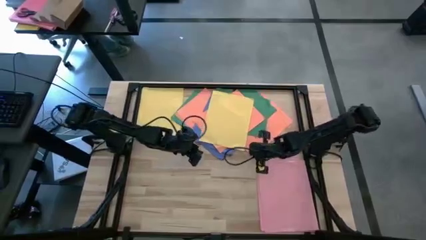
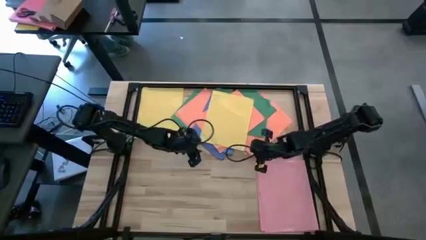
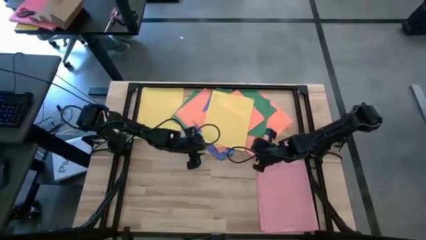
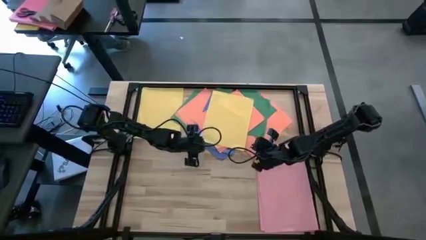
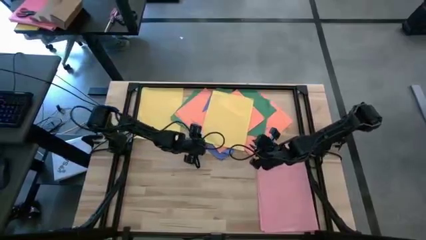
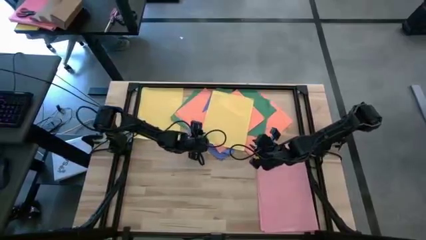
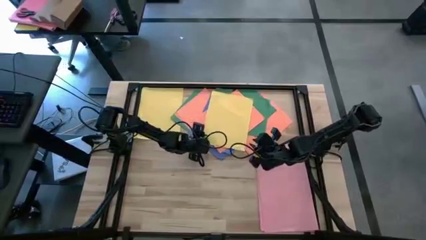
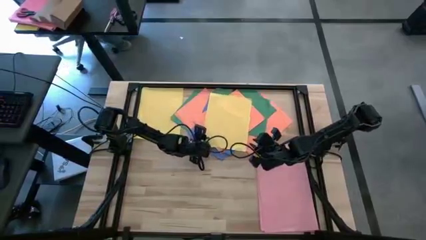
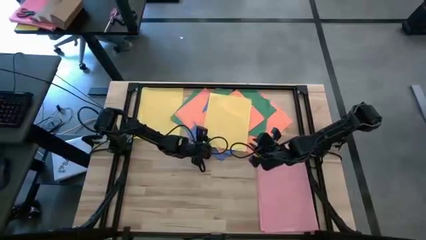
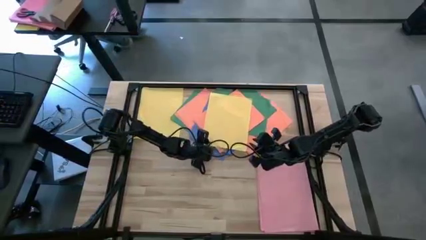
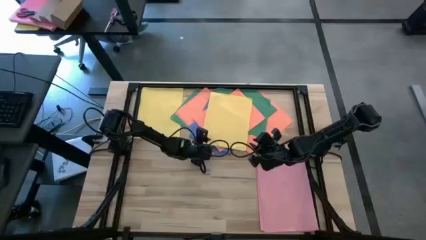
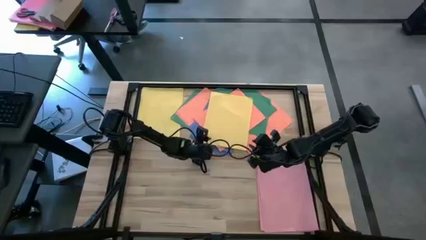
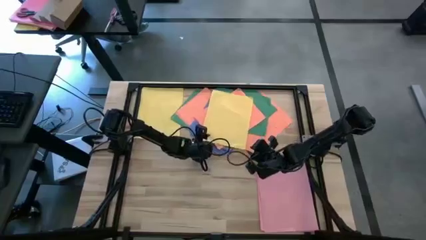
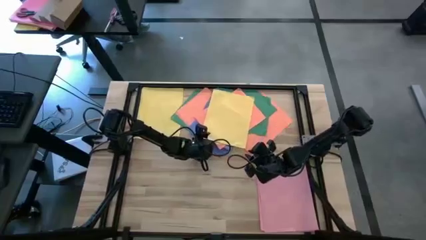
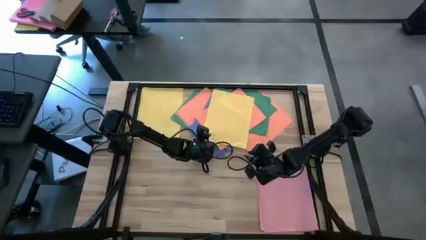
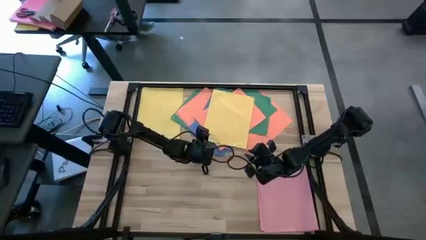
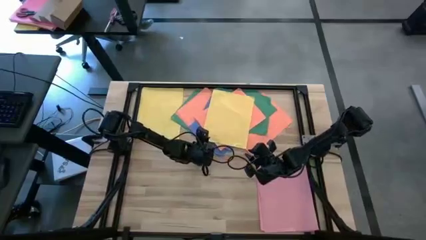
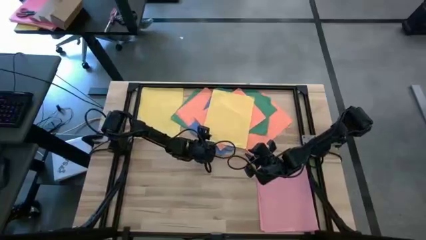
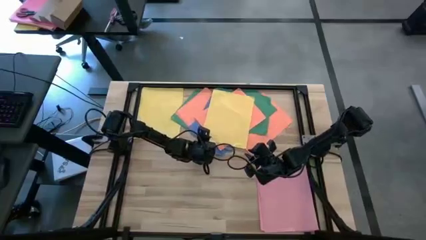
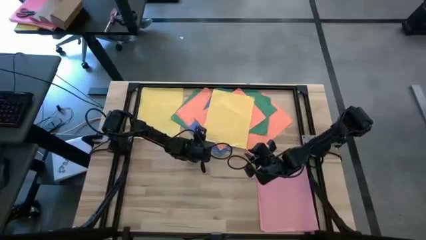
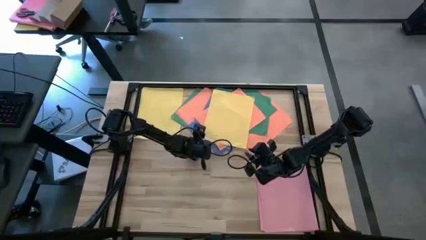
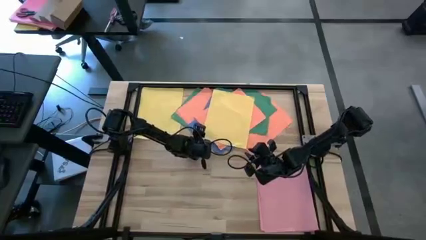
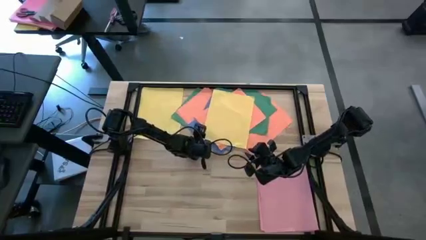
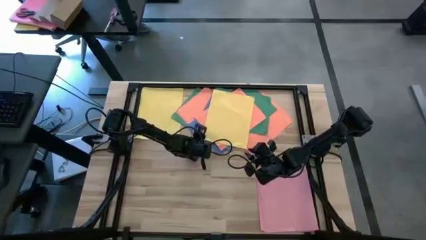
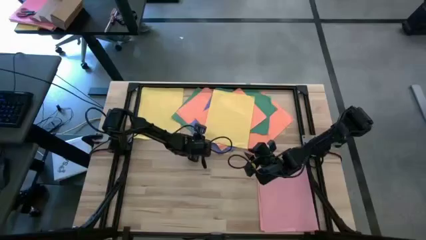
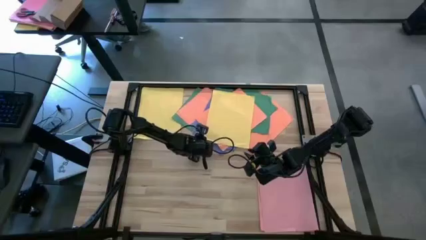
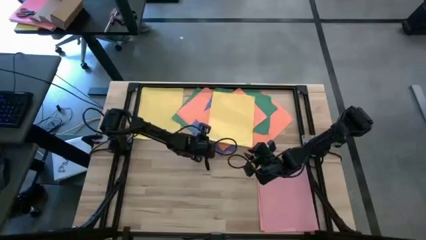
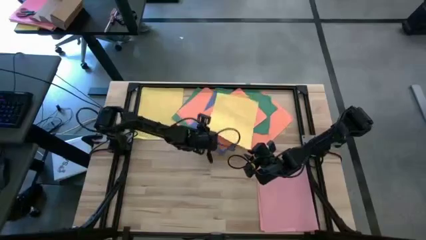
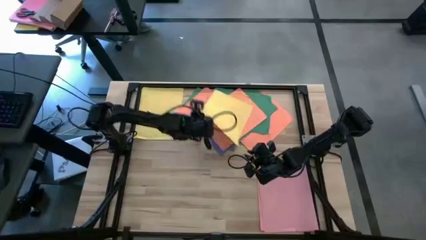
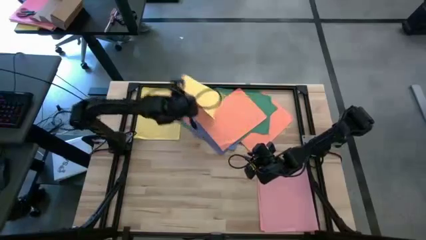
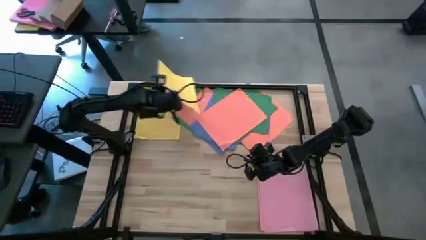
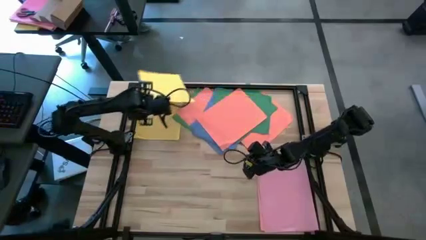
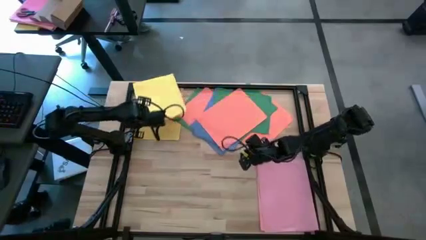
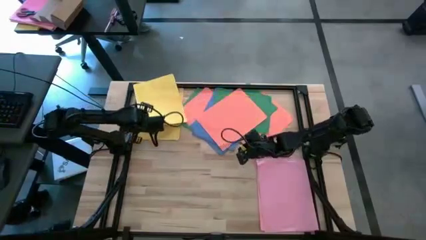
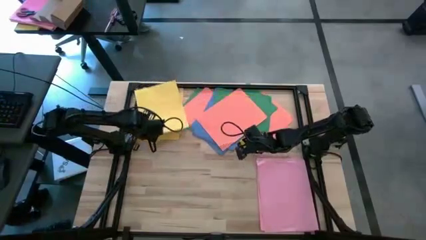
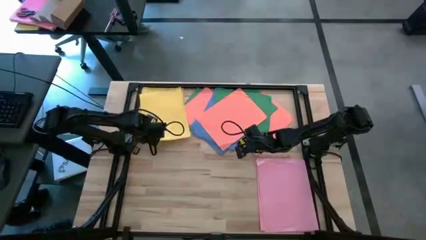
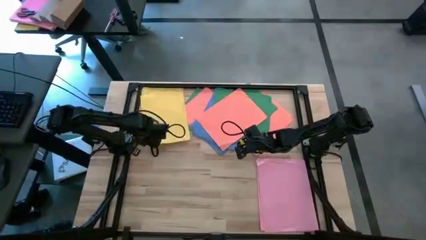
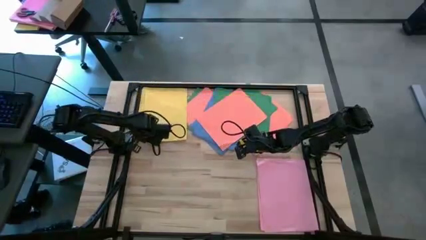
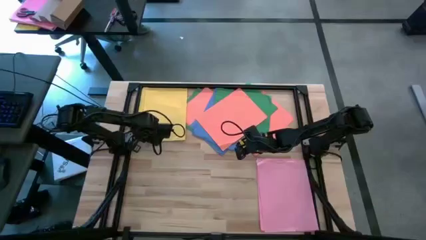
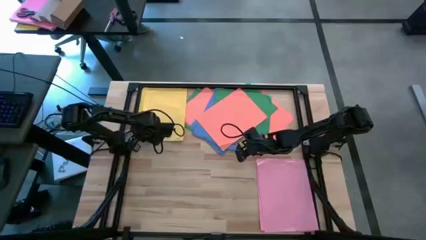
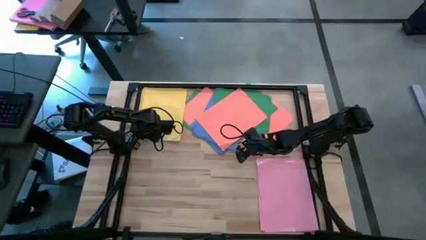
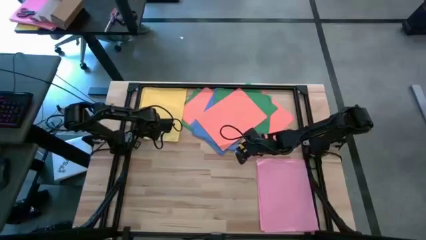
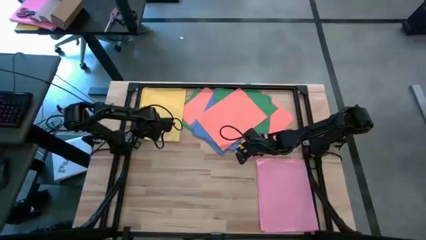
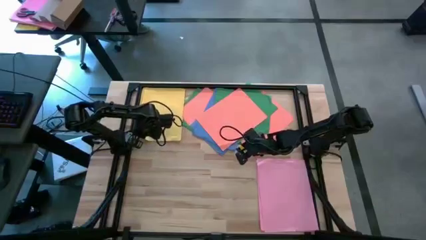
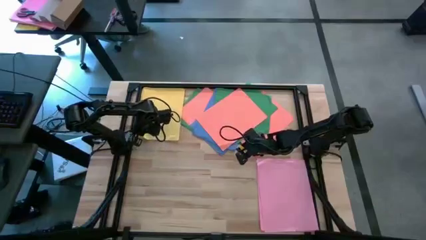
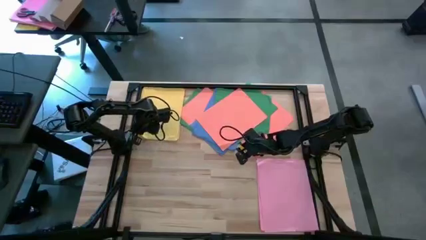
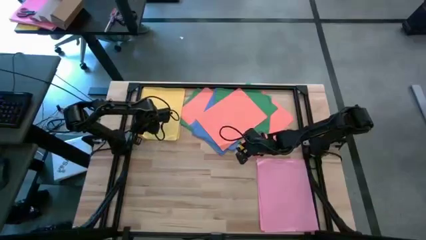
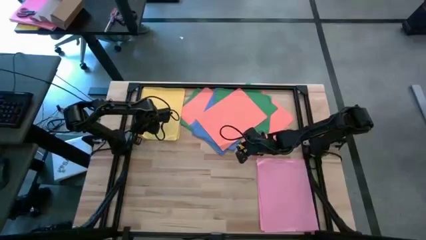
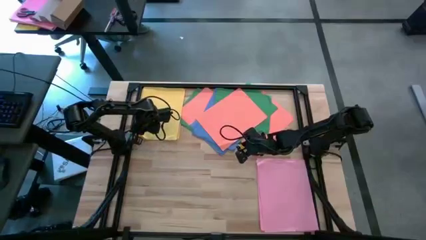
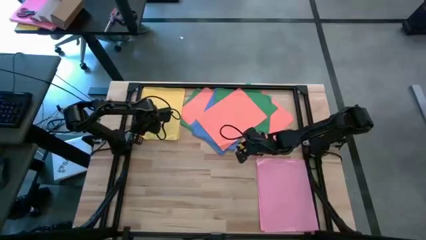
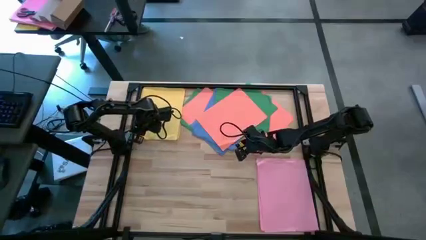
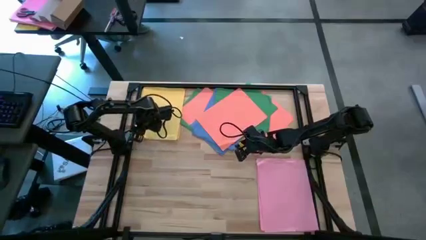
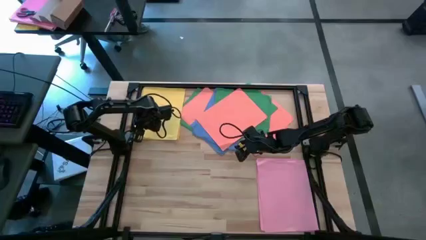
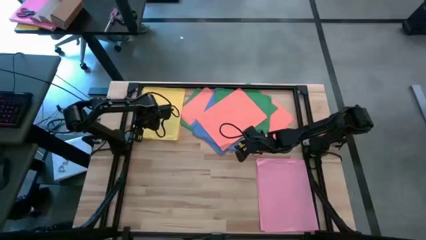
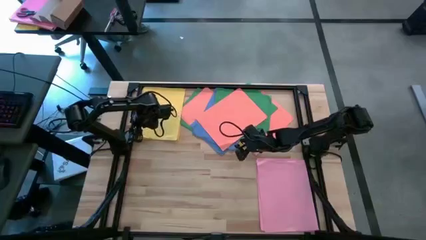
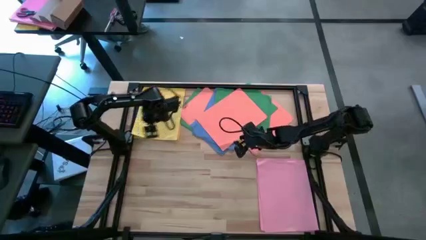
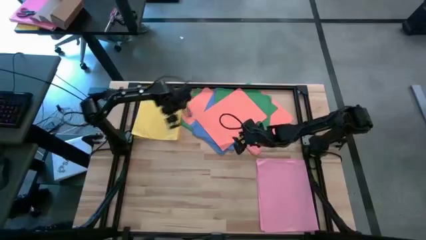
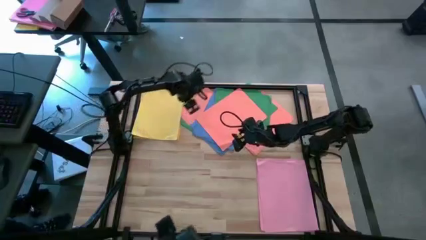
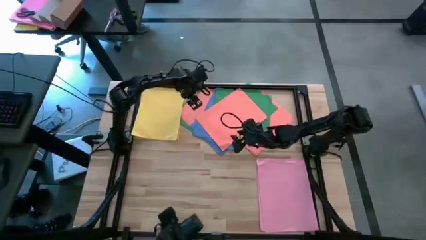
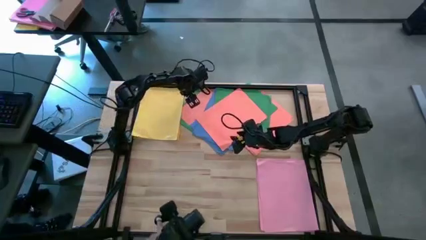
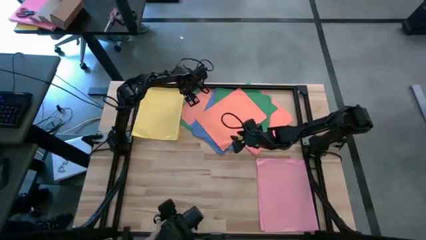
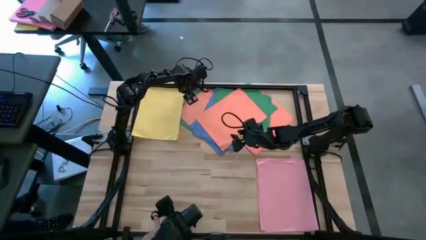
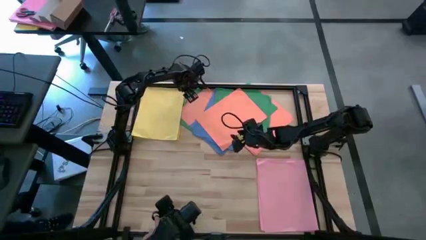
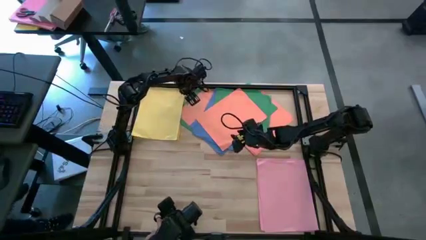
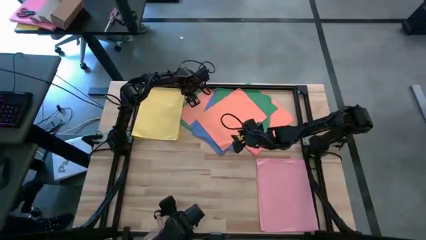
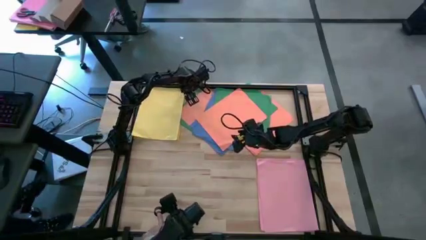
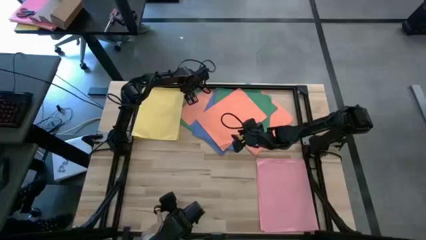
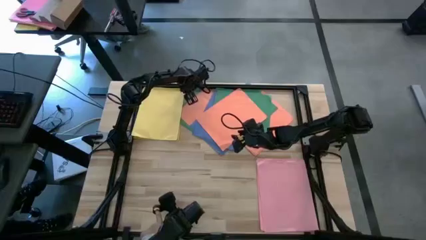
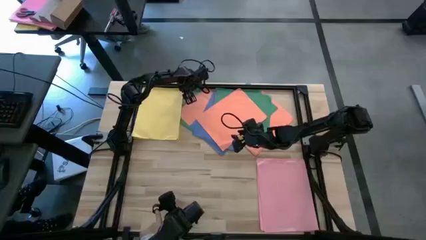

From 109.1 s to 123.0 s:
Task: Organize paper
Stack the yellow paper on top of the stacked yellow papers

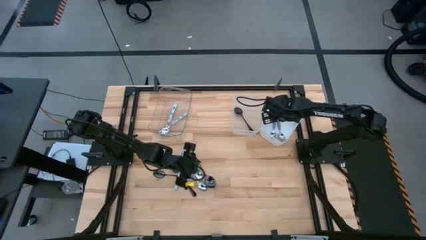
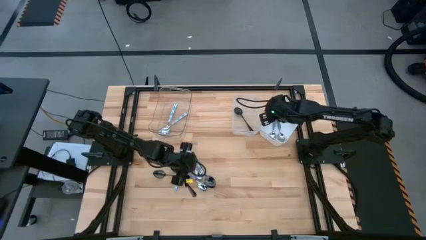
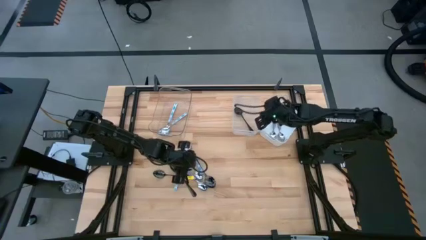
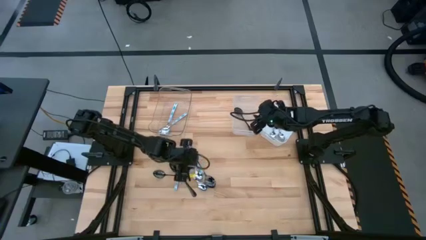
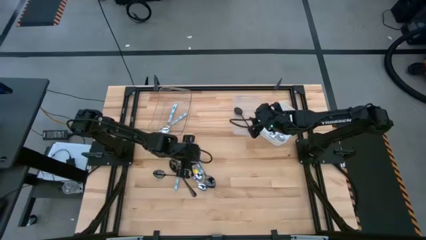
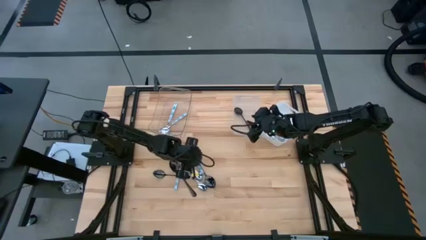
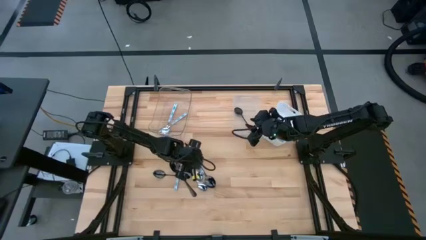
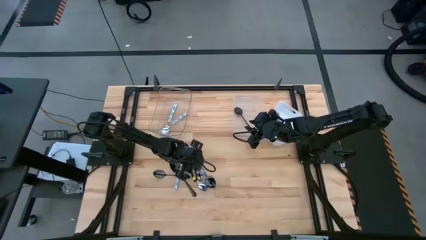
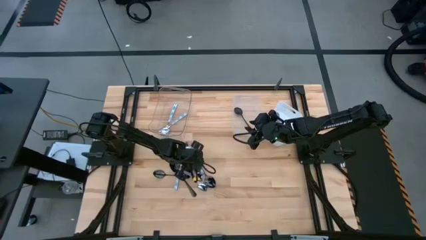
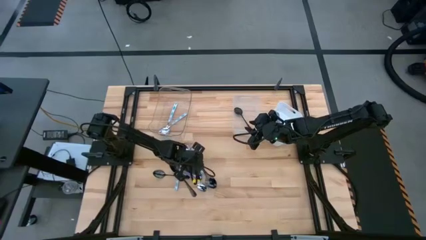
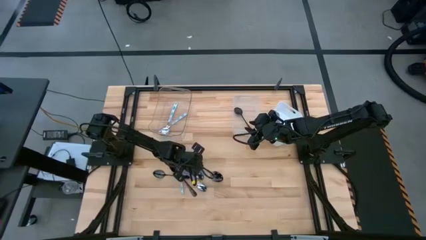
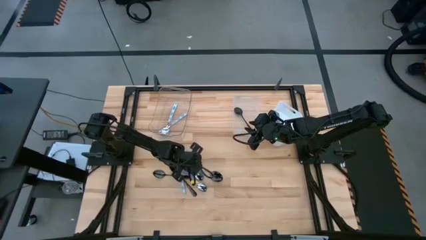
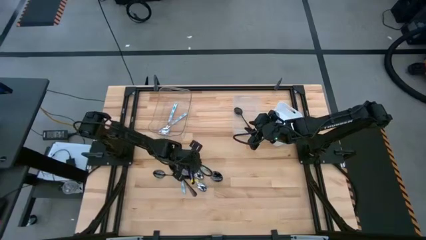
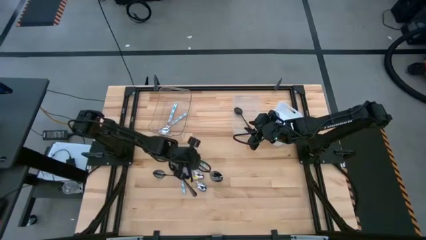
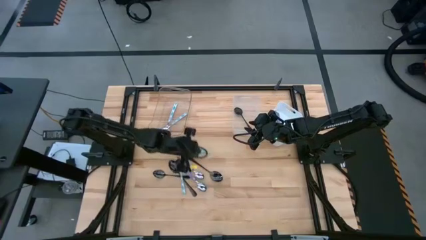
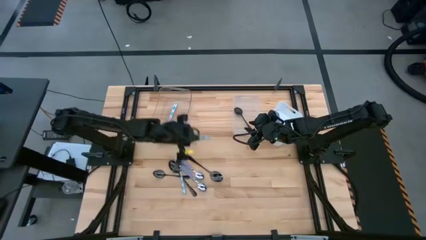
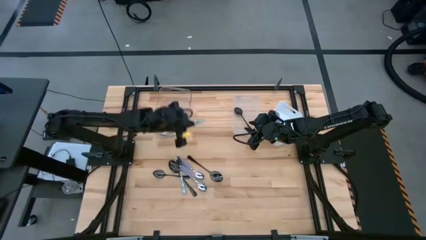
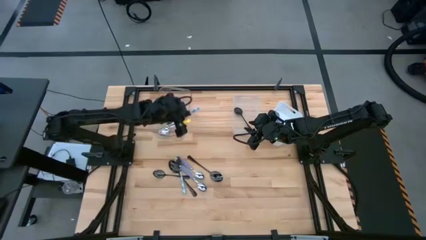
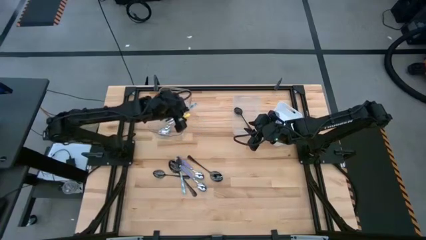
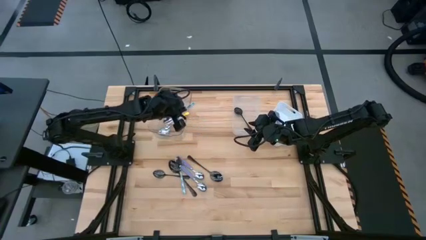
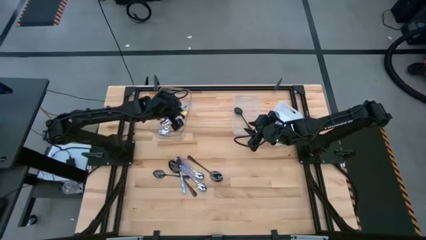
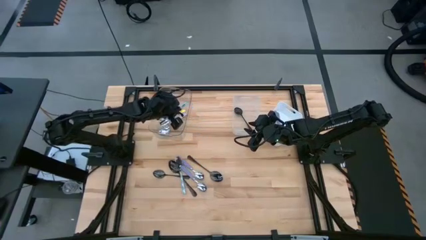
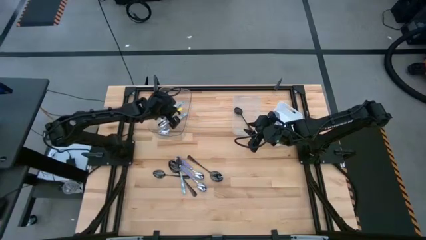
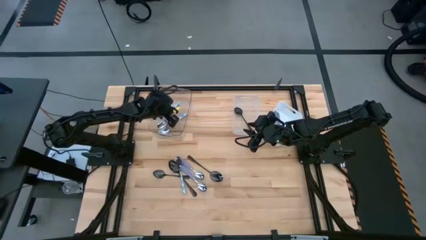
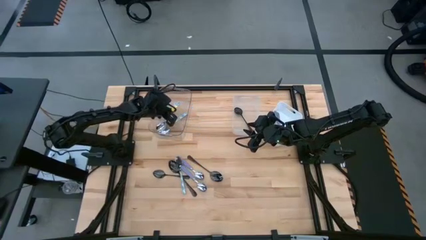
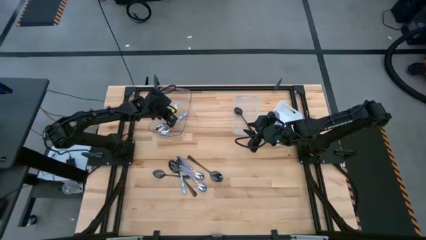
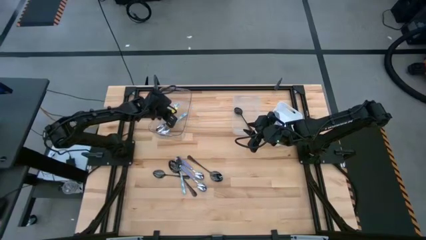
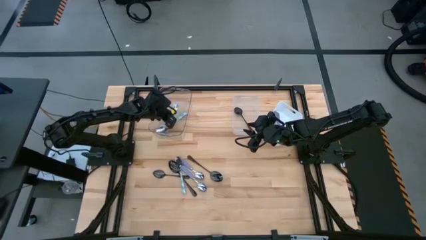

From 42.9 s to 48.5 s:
Task: Sort silverware by color (type)
Put the green pattern spoon into the transparent bin
